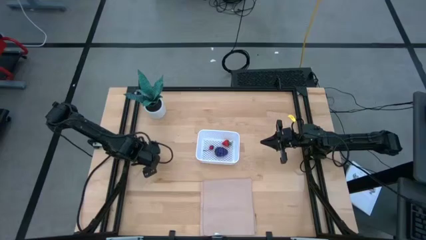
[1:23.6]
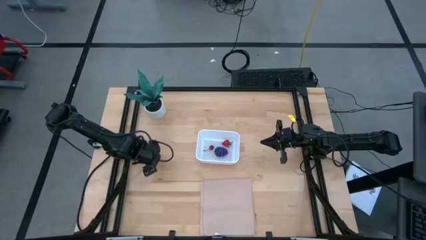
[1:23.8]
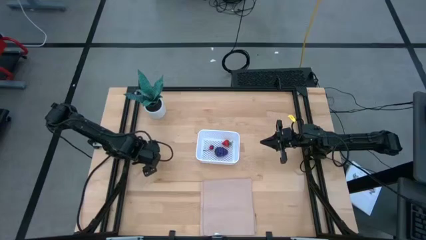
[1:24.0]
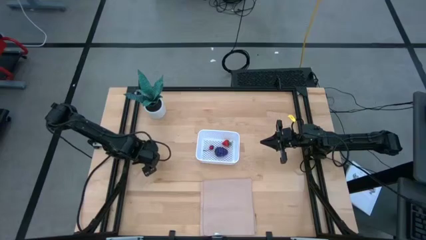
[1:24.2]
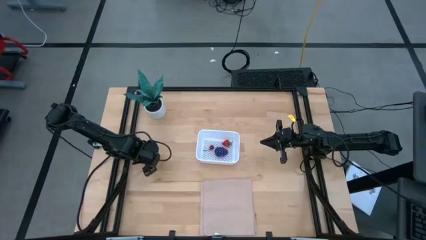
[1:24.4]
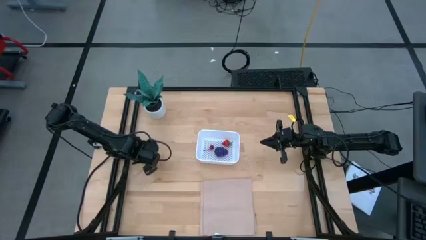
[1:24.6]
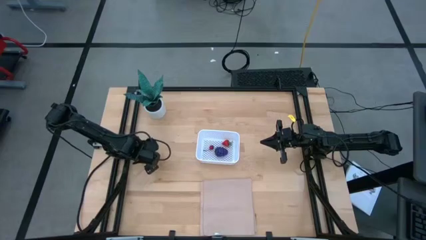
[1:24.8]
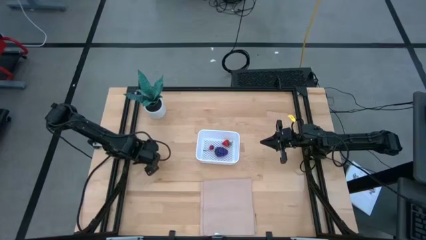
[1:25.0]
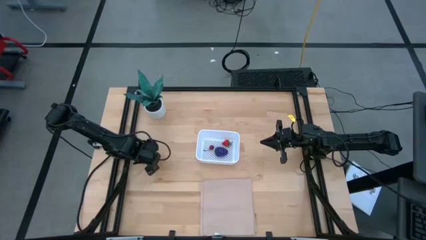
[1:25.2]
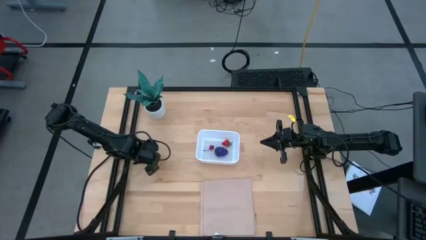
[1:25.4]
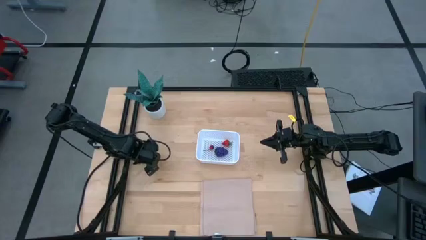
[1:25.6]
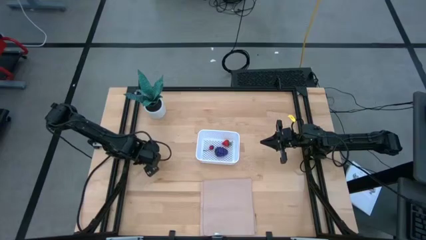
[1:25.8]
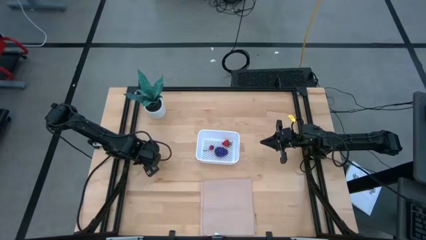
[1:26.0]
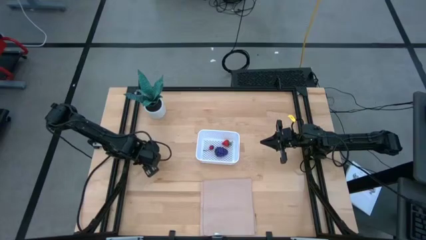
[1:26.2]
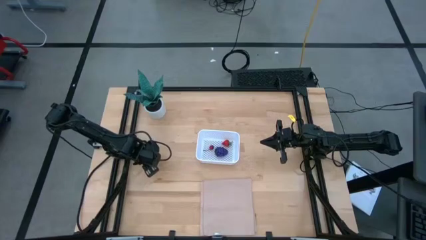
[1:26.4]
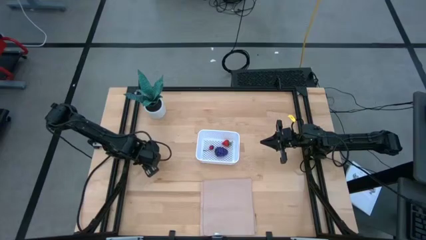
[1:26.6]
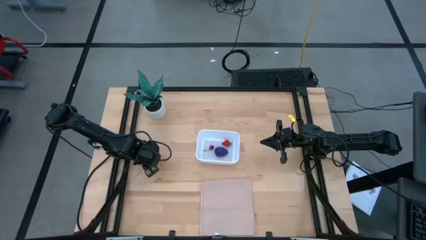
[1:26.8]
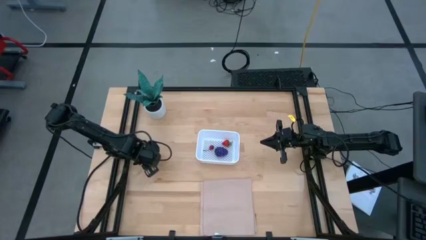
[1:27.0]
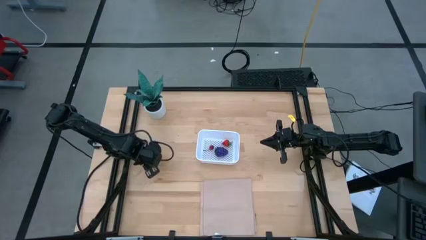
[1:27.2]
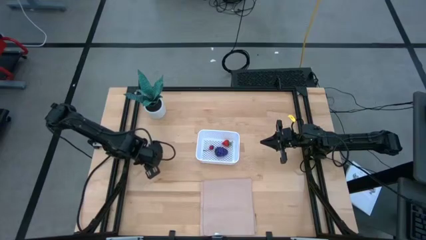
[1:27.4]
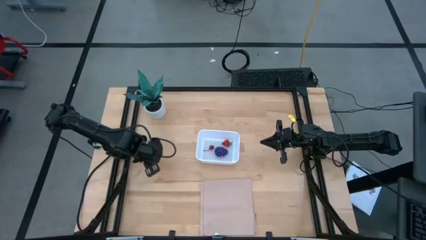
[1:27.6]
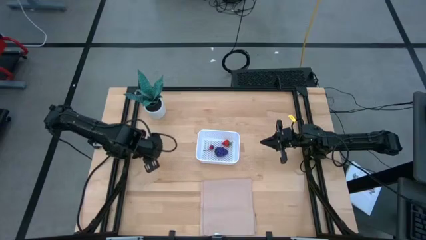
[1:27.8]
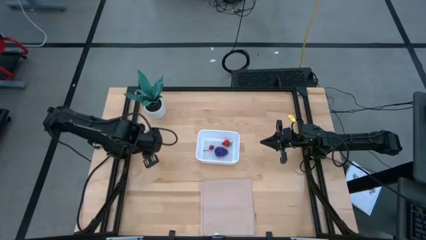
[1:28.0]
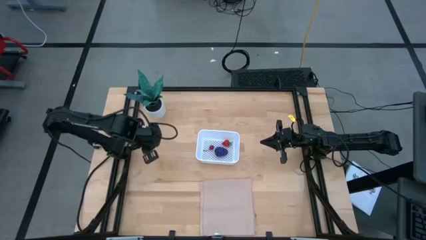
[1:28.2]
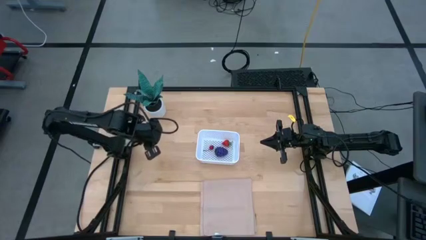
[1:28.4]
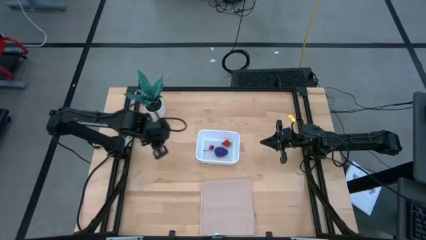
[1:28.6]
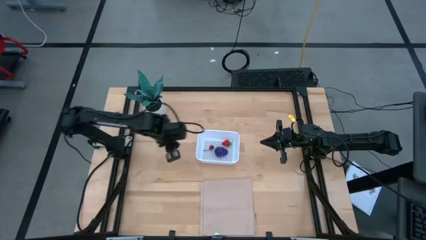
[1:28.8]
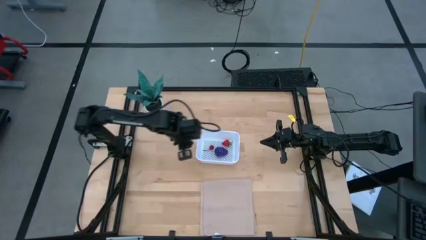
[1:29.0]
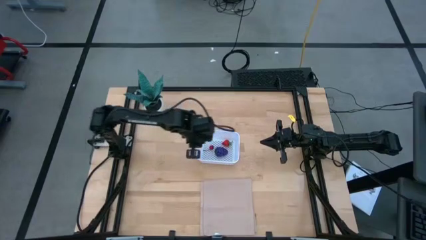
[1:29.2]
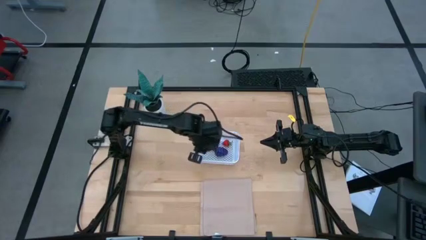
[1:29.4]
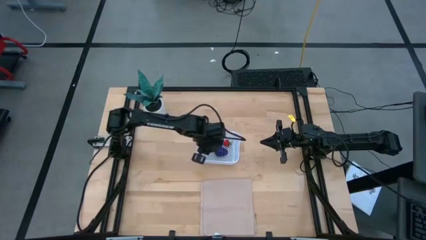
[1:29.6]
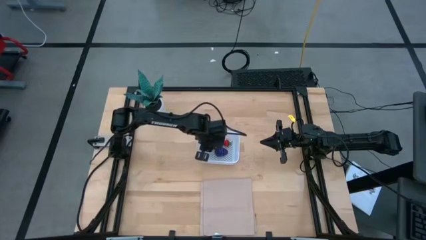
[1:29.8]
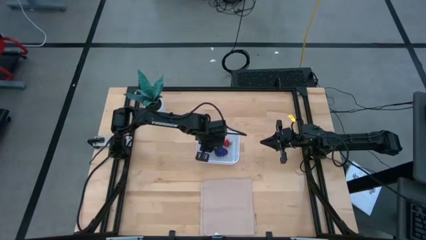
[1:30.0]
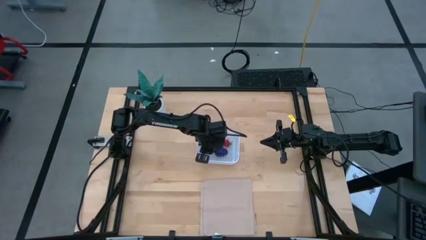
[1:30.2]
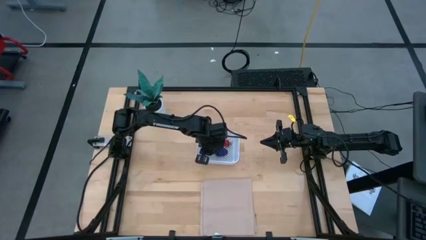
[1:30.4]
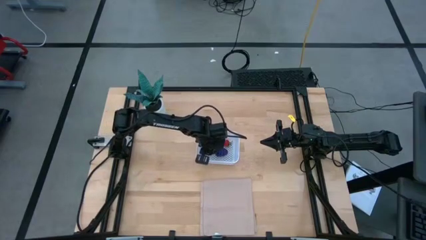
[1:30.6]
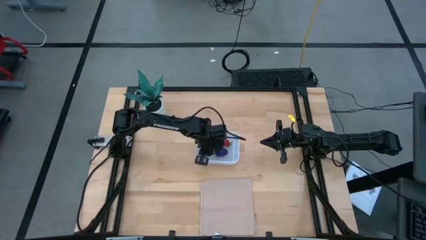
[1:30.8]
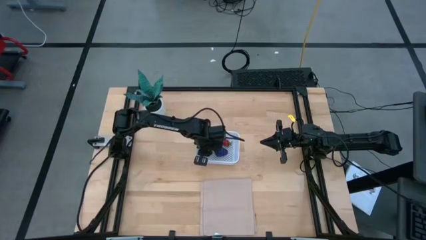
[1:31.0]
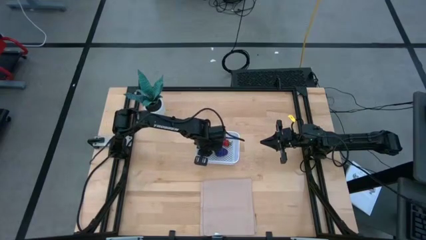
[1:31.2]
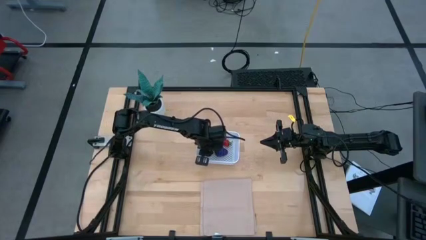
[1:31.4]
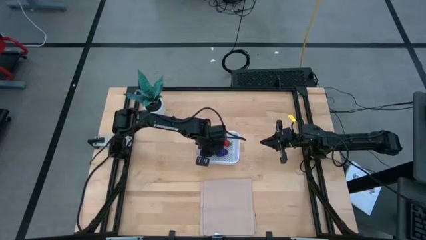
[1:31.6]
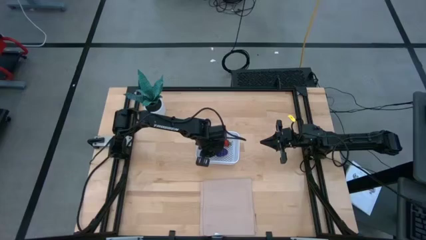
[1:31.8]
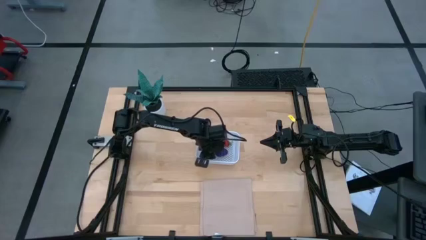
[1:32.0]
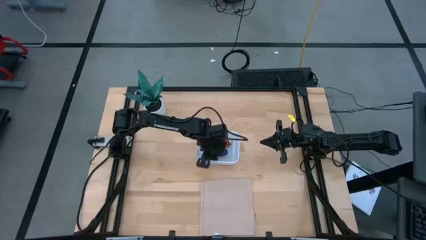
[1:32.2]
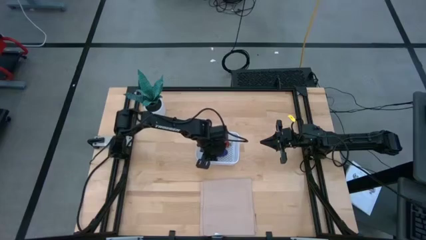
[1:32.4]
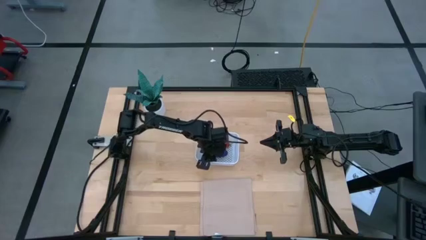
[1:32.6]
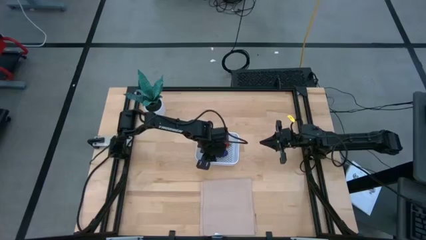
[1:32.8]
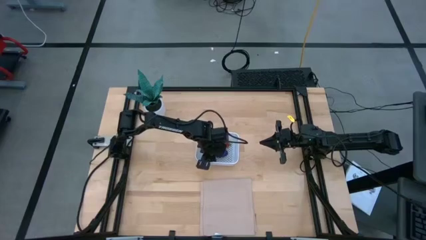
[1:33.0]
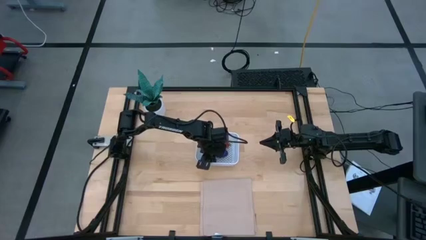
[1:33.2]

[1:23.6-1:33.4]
Task: Pick and placing Produce into tupperware
Put the black cherry into the white bin

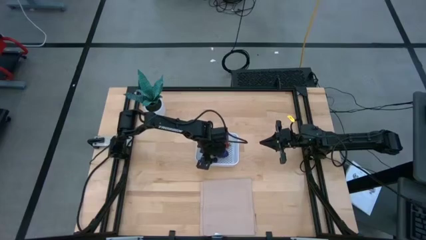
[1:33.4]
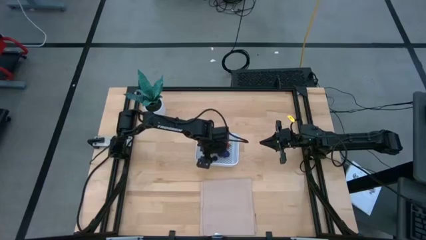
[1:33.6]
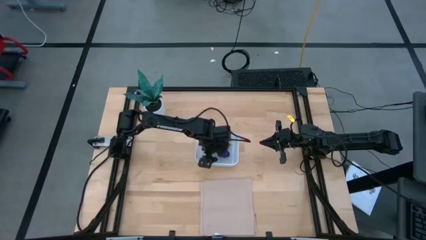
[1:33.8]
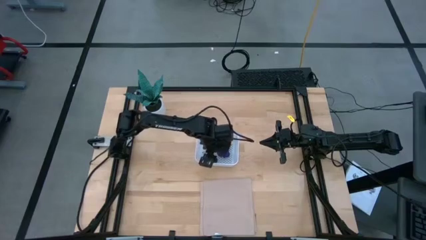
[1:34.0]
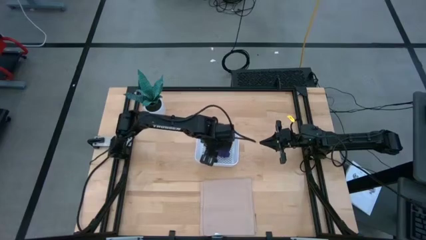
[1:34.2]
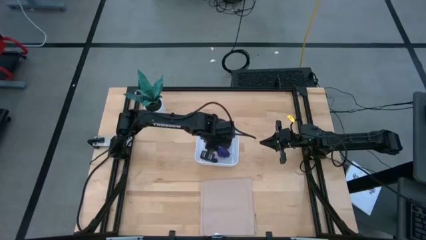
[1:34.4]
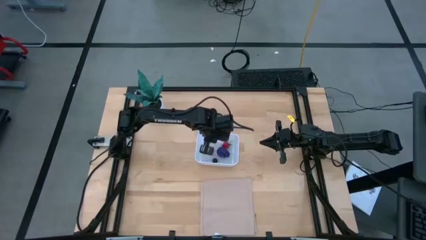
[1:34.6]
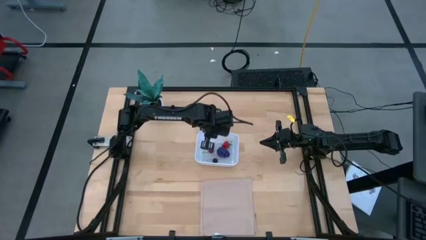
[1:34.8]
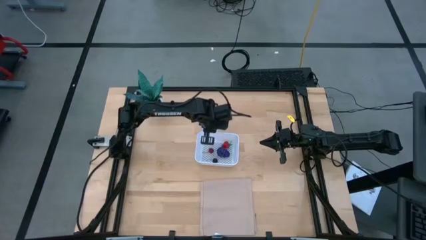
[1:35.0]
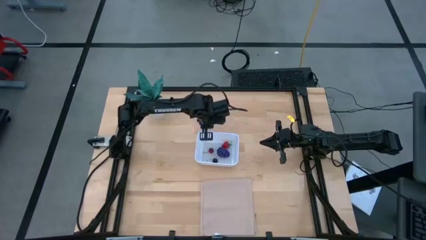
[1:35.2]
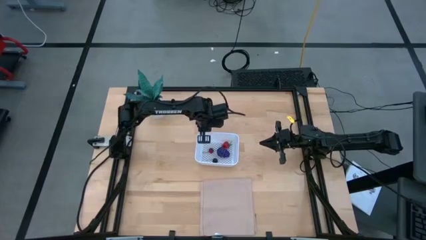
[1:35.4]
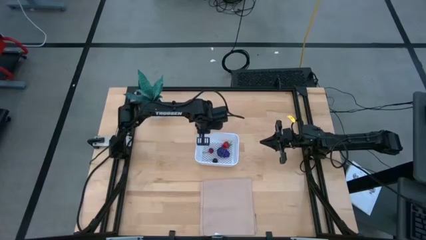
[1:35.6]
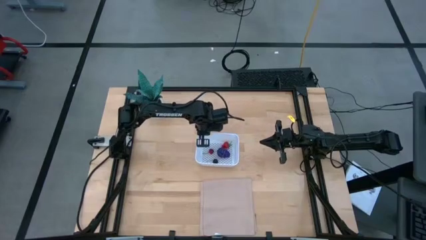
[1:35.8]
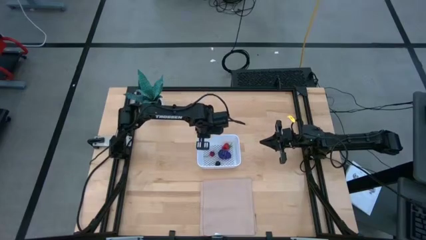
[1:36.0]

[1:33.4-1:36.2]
Adjust the white bin

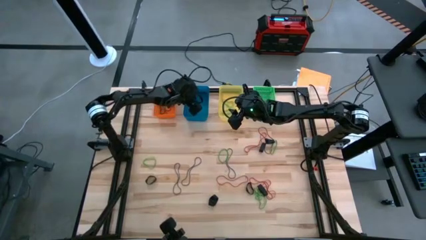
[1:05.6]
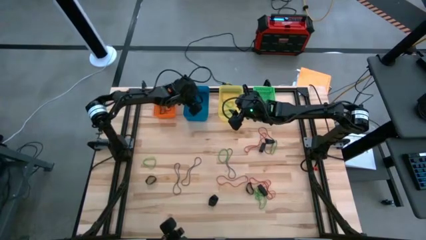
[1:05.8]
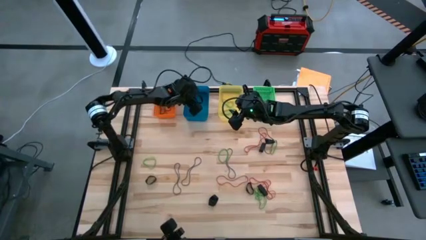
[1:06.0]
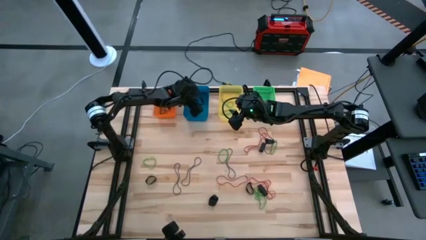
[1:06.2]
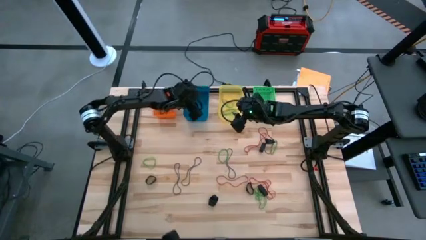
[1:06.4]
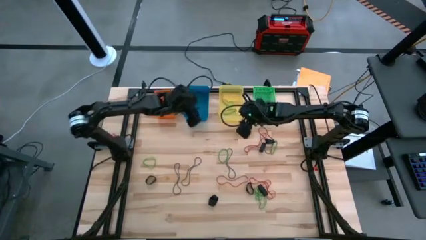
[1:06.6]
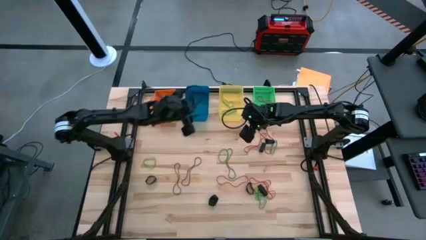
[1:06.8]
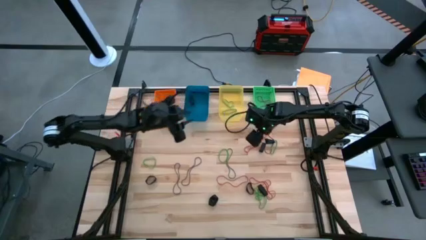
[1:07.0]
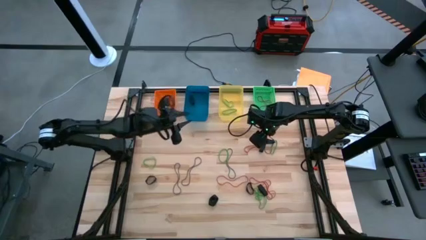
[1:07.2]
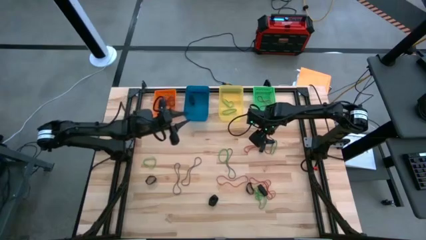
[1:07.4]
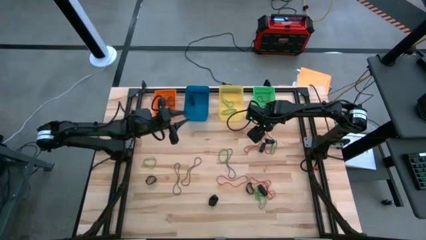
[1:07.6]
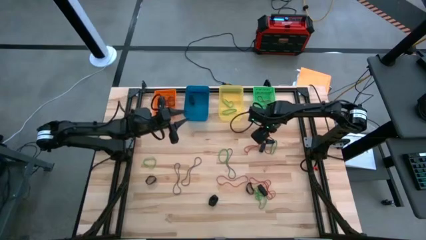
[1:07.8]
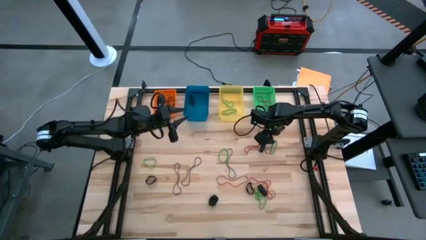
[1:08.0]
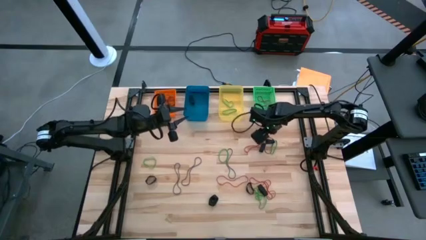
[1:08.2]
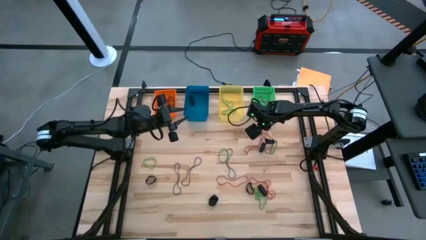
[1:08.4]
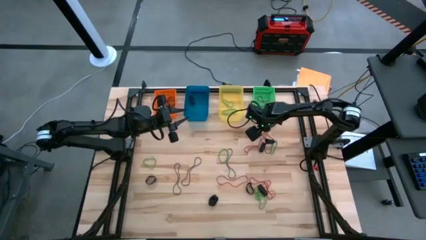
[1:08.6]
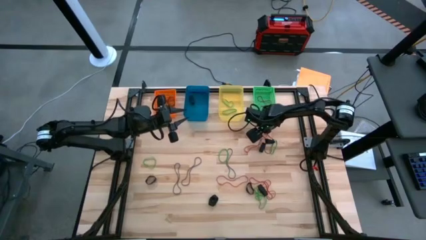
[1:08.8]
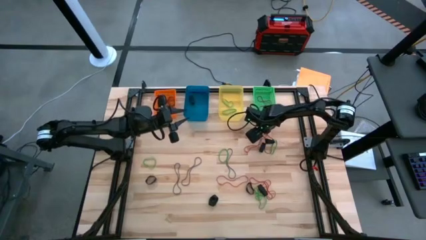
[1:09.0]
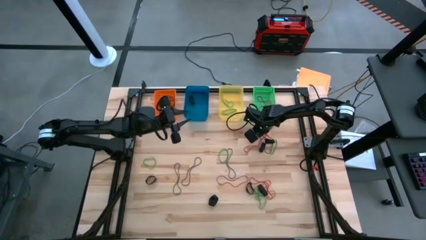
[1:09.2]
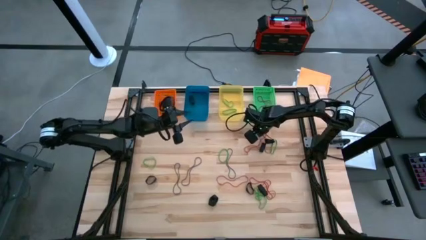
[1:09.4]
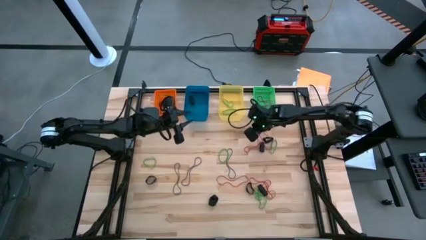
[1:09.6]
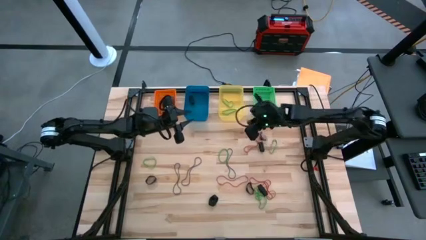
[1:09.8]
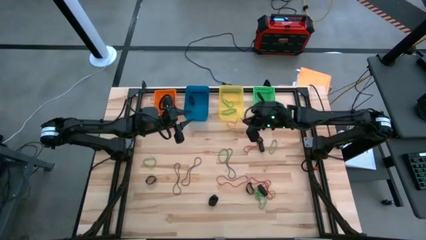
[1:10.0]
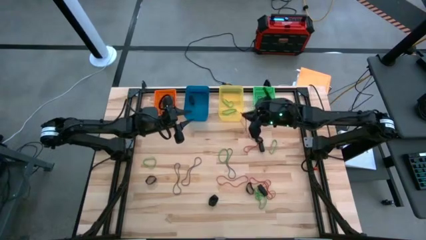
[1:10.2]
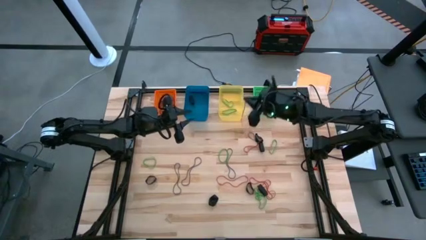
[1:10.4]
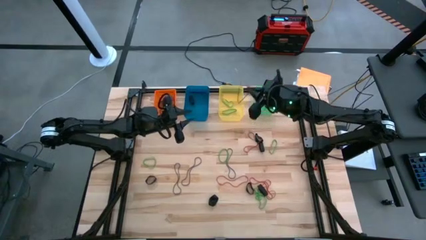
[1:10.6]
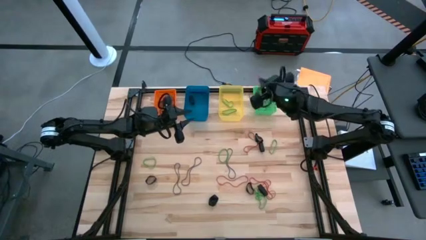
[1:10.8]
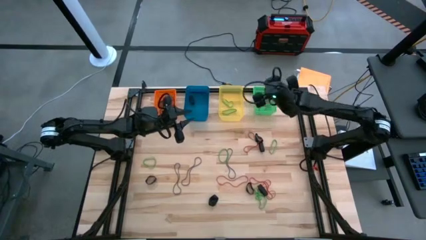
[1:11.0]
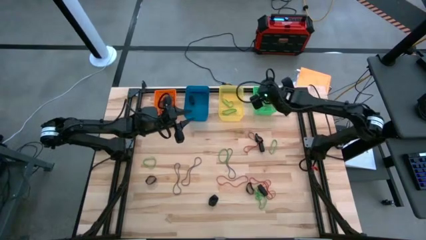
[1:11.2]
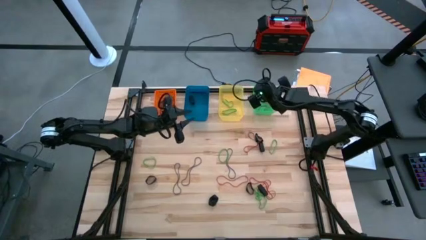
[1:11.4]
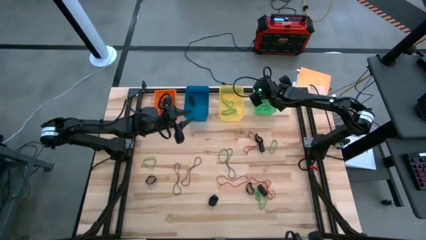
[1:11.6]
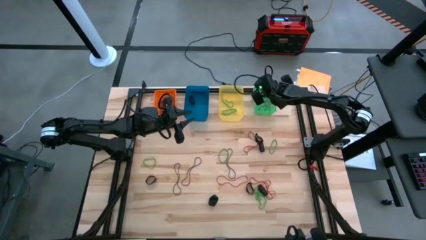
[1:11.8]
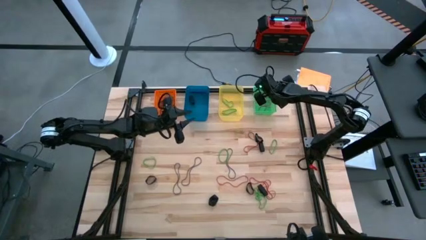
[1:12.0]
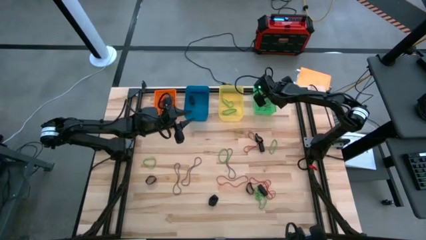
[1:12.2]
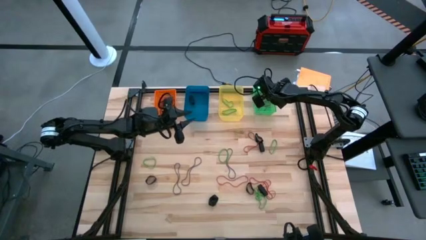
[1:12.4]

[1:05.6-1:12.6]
Task: Sort rubber bands into baskets
Put the red rubber band into the green bin
